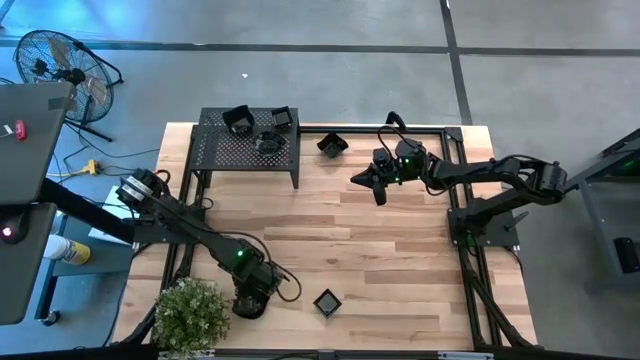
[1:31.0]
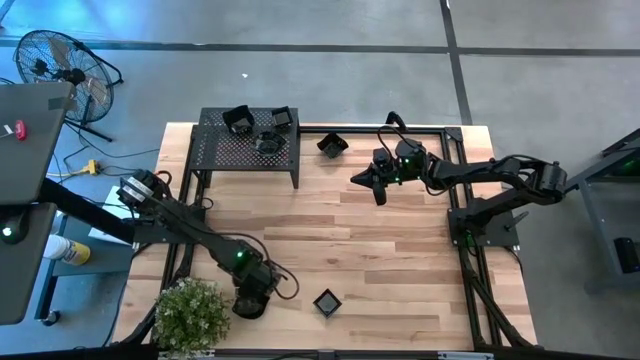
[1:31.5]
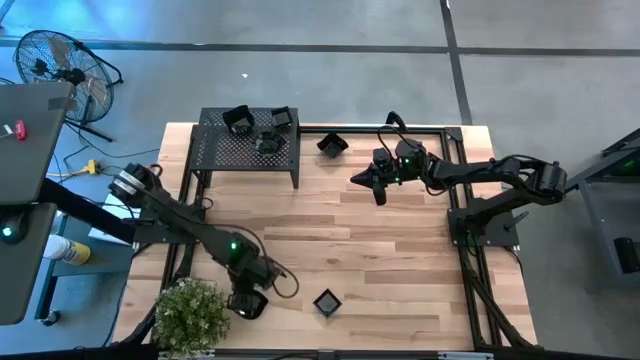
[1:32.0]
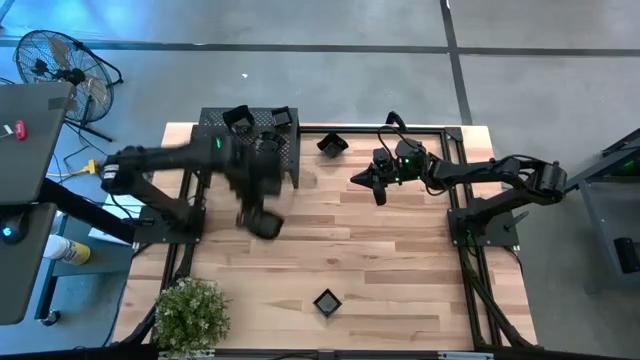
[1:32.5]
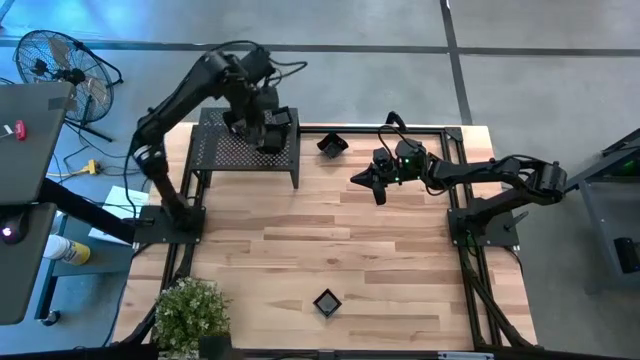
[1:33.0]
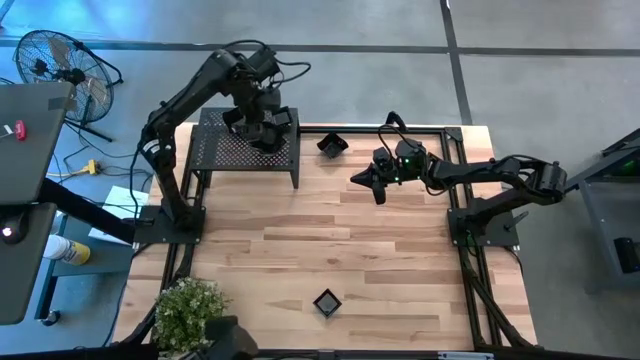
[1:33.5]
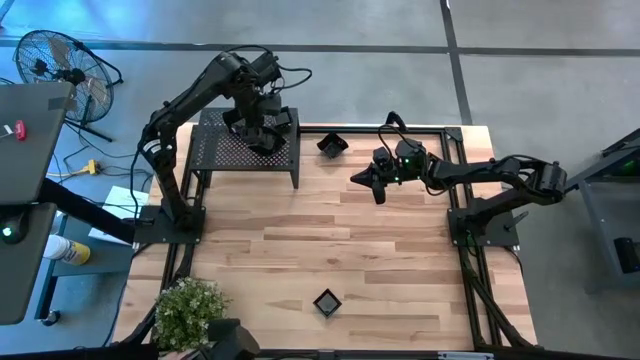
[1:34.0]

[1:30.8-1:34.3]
Task: Pick & Place Mini shaped plates
Stack the leaf-shaped plate on top of the other leaf-shaped plates on the shelf

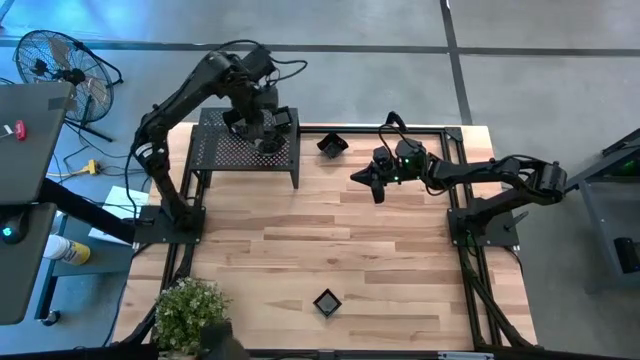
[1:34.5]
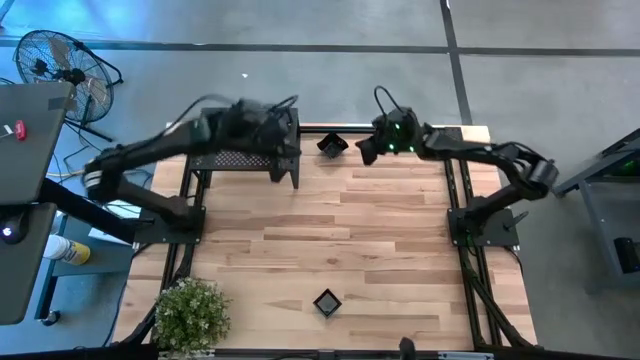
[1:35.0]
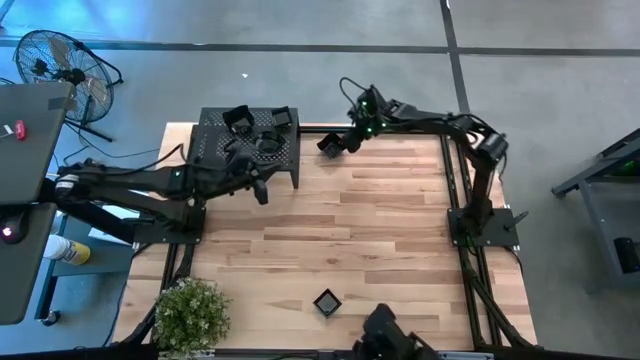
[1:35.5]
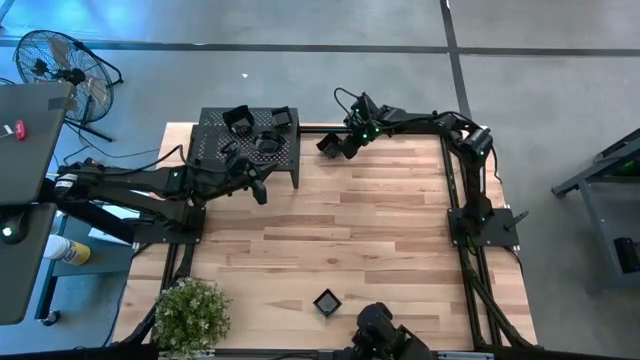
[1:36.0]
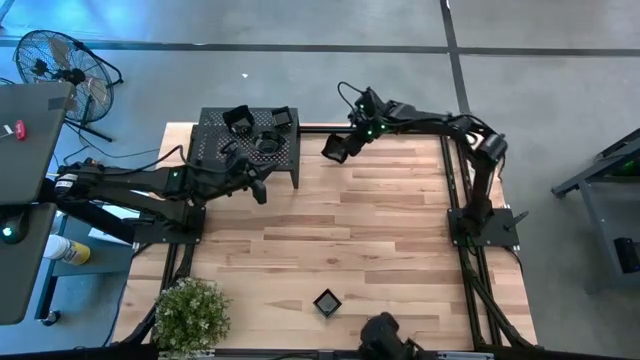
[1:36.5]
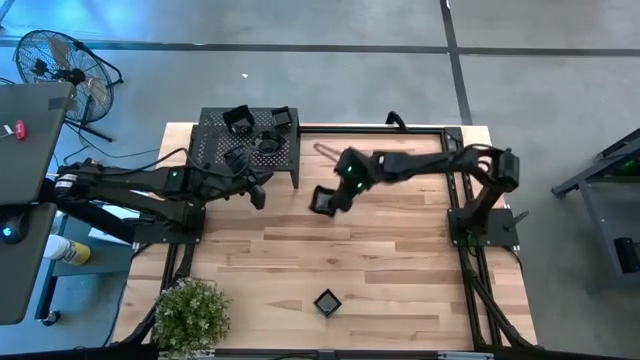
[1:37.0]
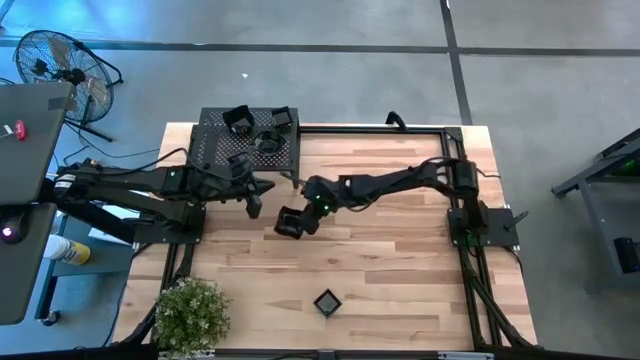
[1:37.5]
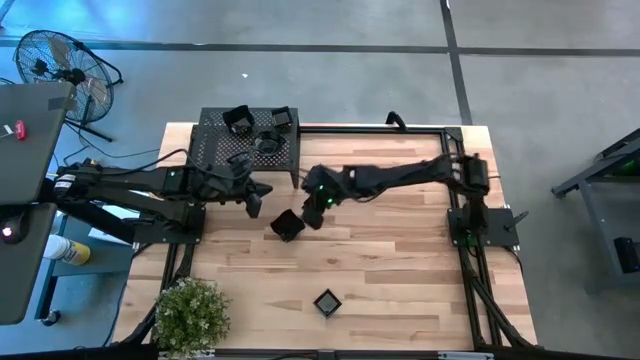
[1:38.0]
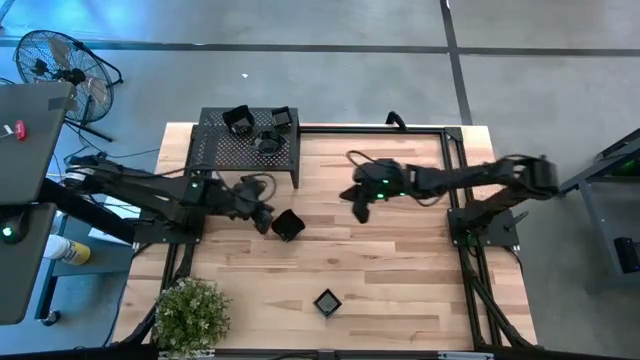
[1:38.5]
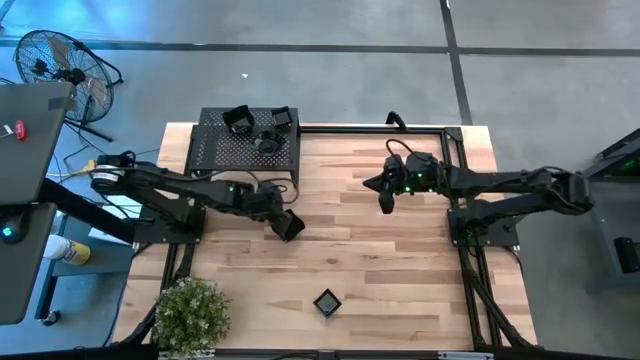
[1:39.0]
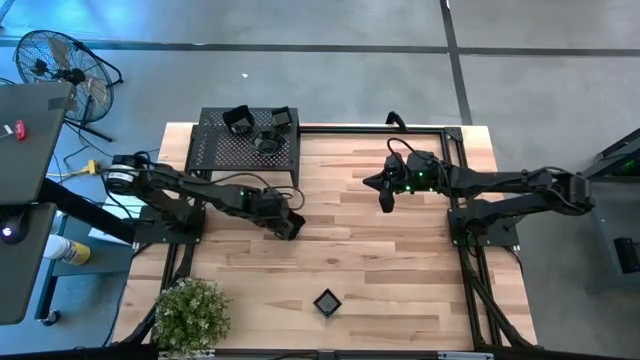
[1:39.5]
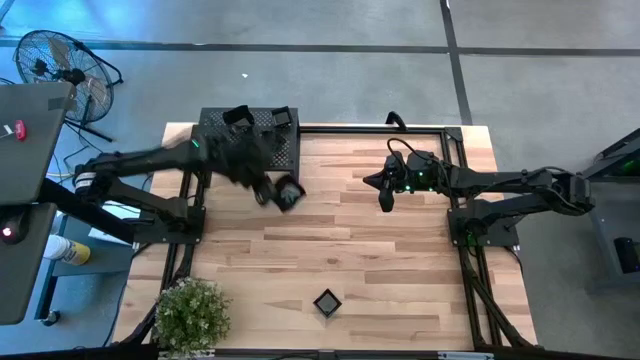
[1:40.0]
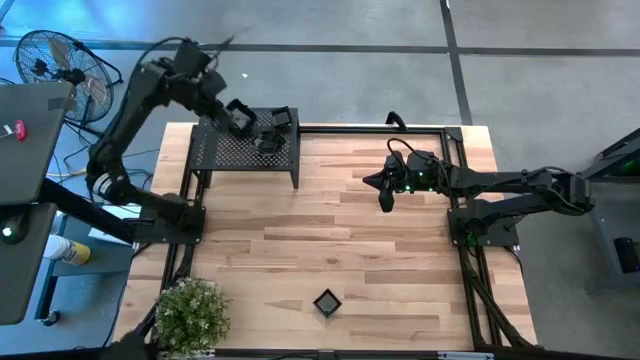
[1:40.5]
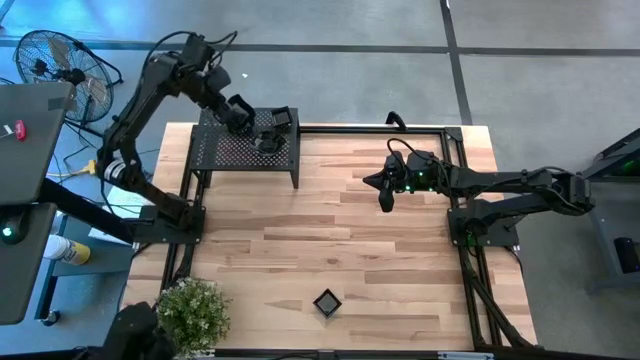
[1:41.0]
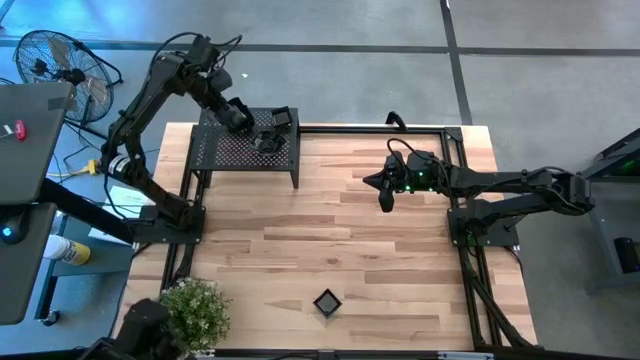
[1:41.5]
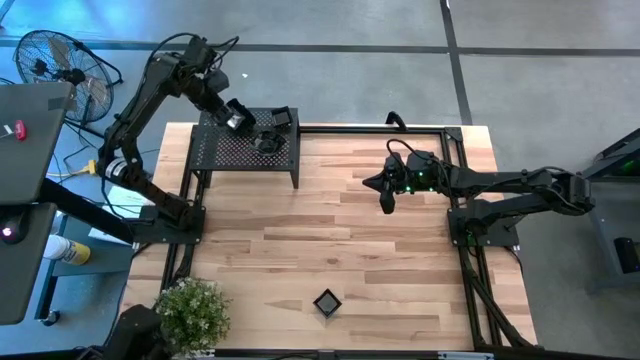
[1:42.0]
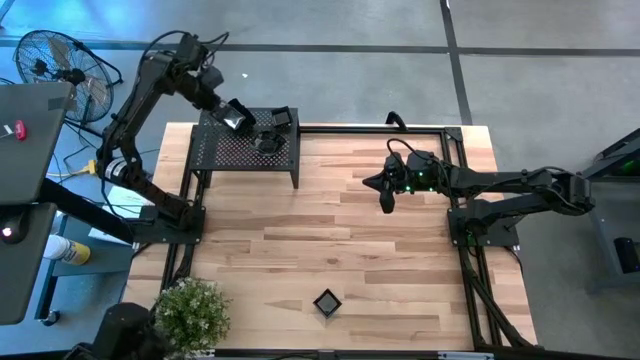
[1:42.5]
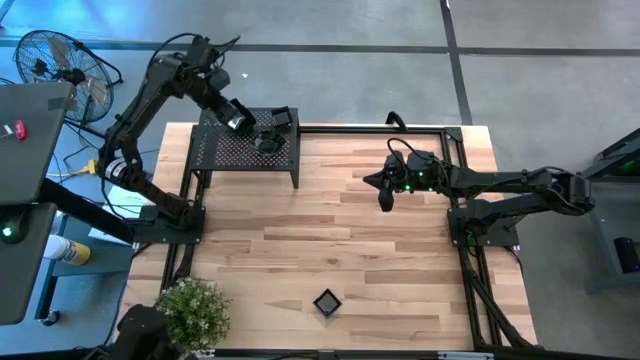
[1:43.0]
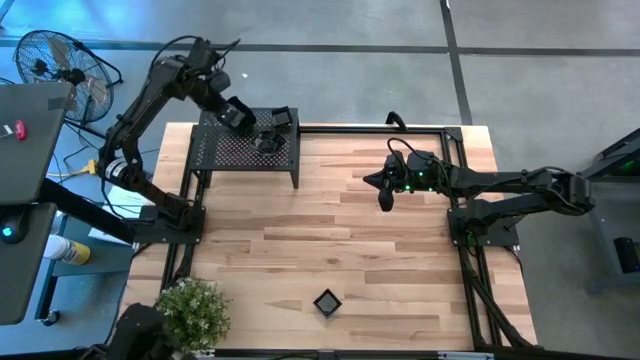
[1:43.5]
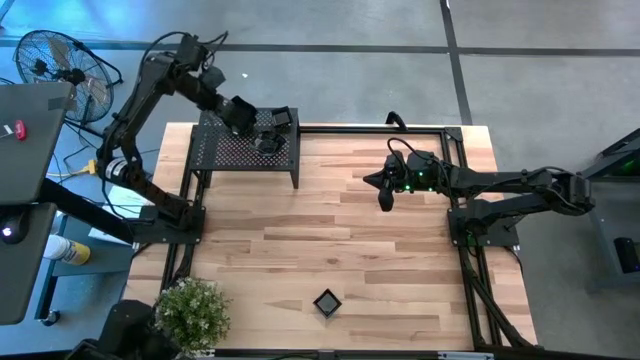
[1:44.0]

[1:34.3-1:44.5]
Stack the distorted square plate on top of the other distorted square plates on the shelf

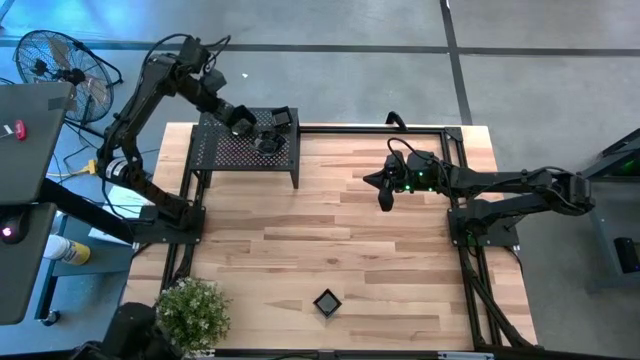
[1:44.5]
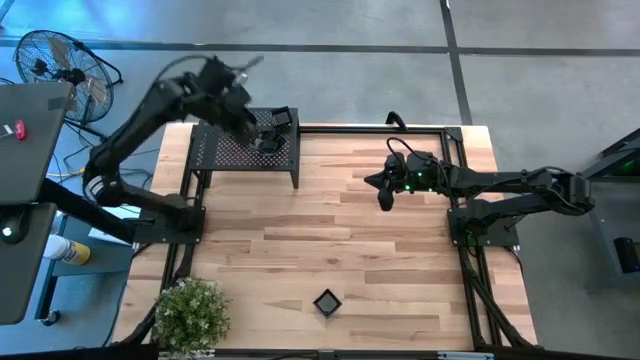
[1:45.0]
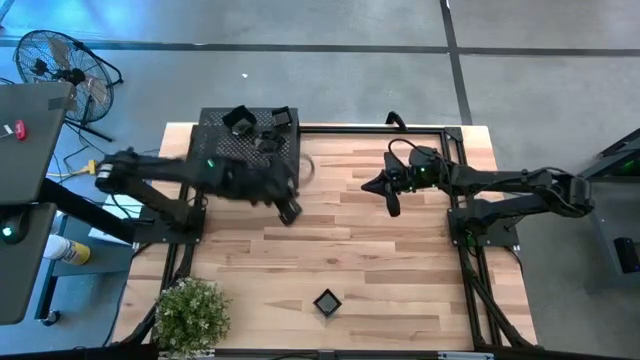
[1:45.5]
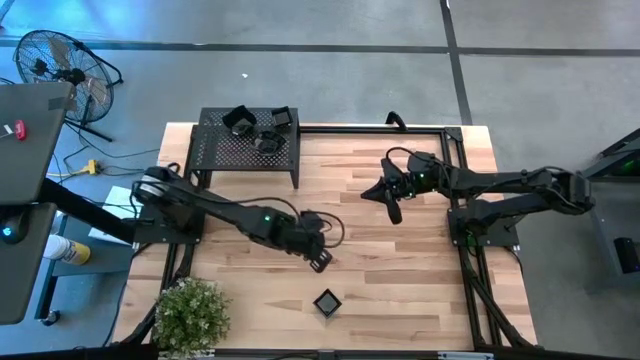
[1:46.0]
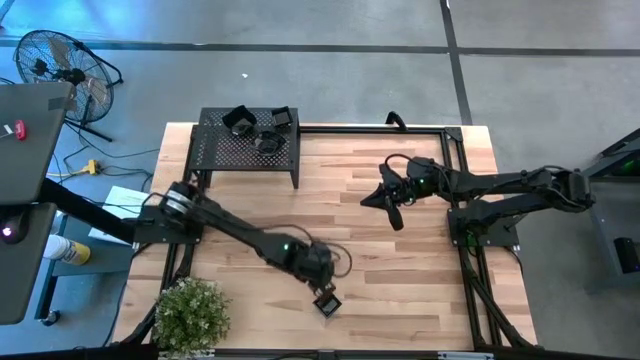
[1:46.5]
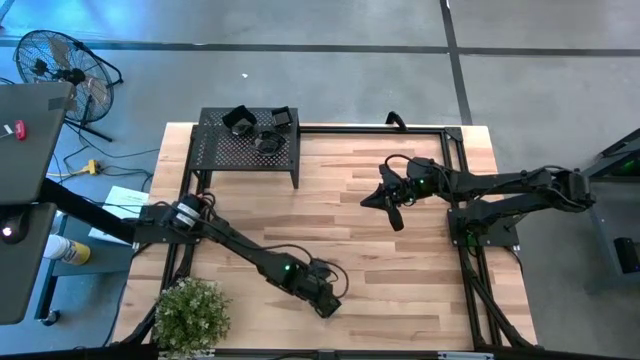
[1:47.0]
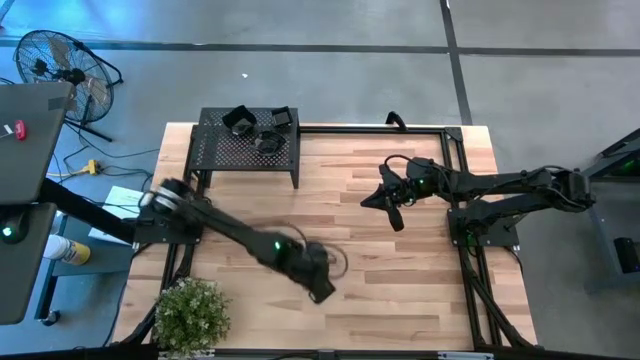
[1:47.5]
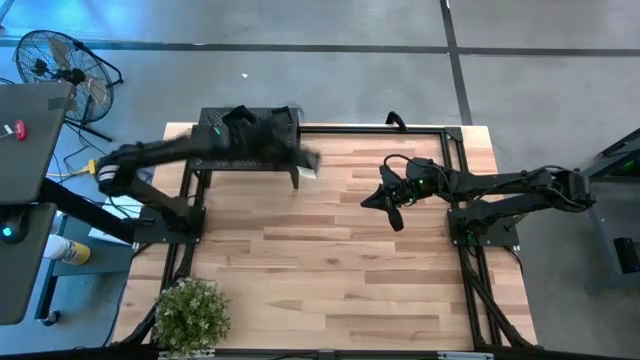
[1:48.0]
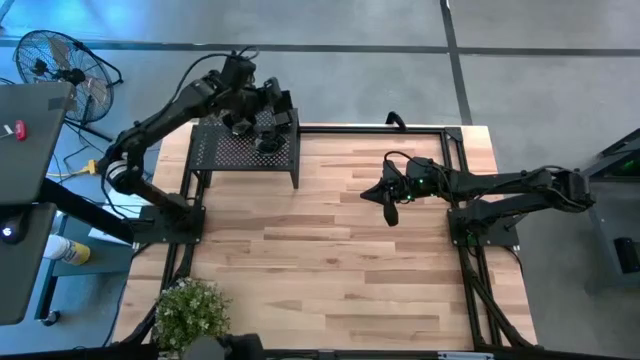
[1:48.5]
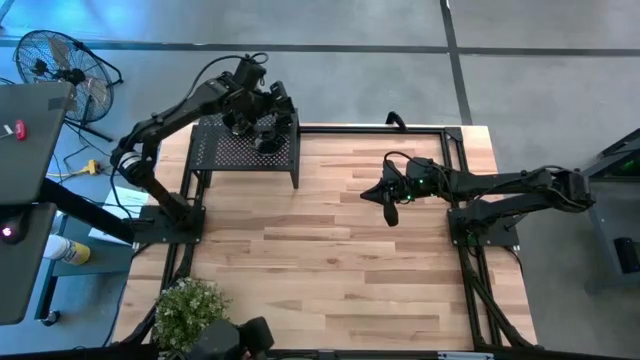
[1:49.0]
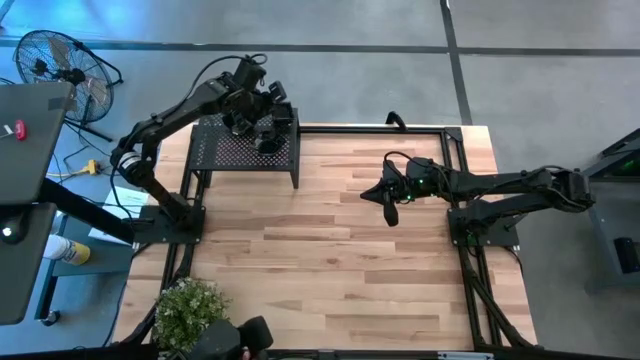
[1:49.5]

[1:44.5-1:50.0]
Stack the square plate on top of the other square plates on the shelf

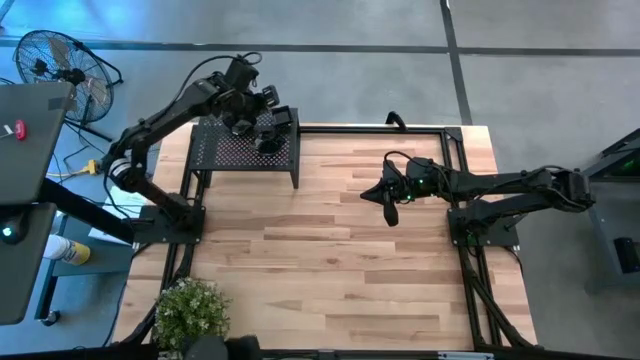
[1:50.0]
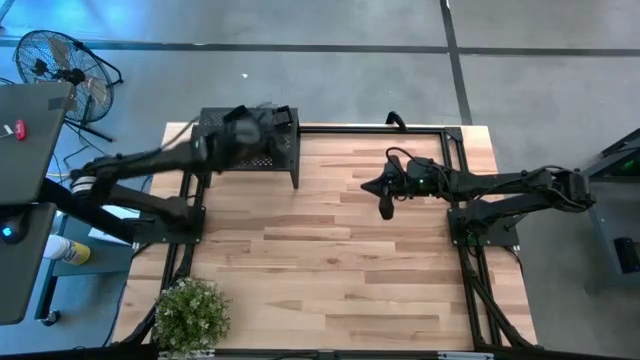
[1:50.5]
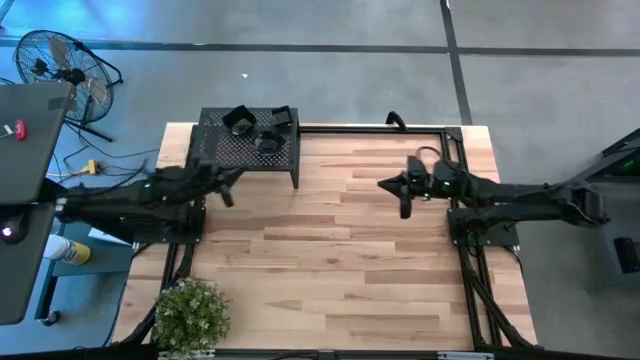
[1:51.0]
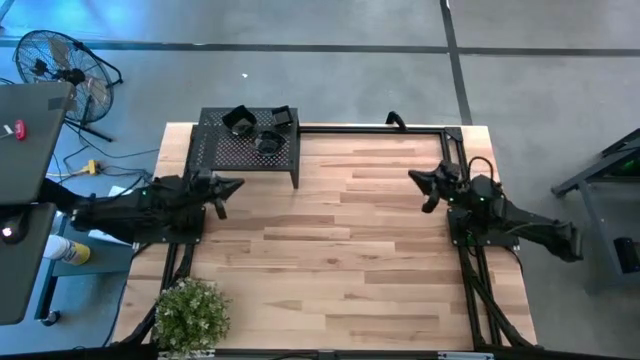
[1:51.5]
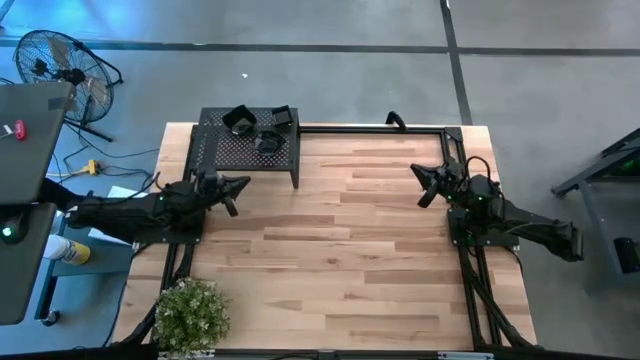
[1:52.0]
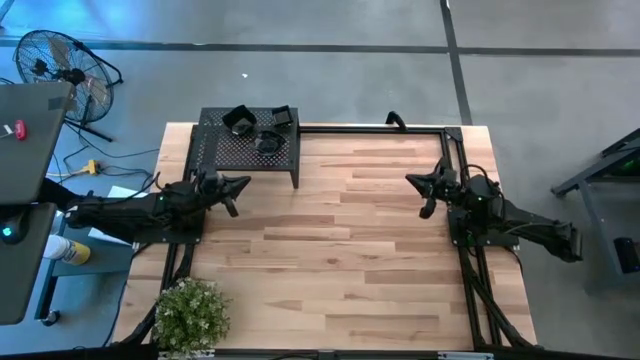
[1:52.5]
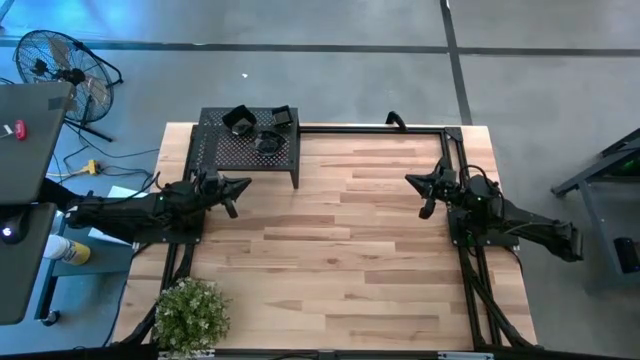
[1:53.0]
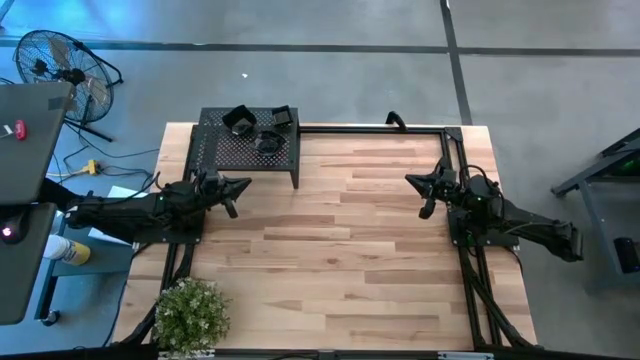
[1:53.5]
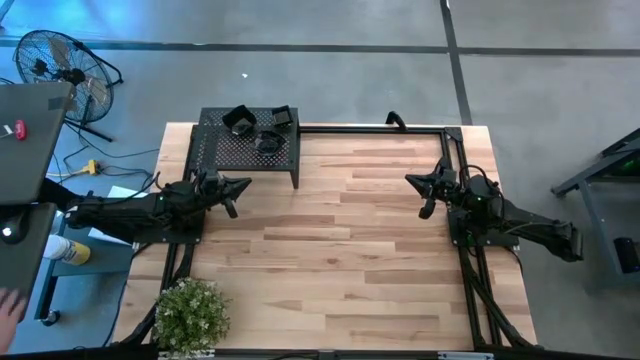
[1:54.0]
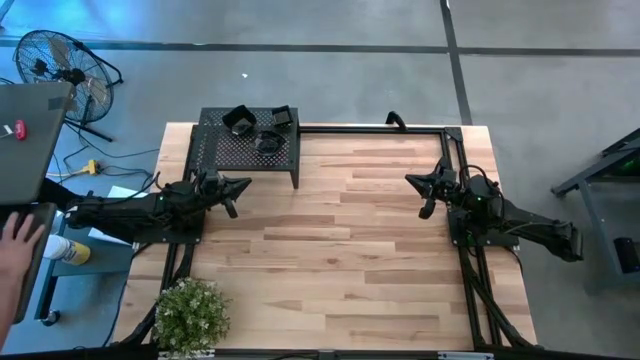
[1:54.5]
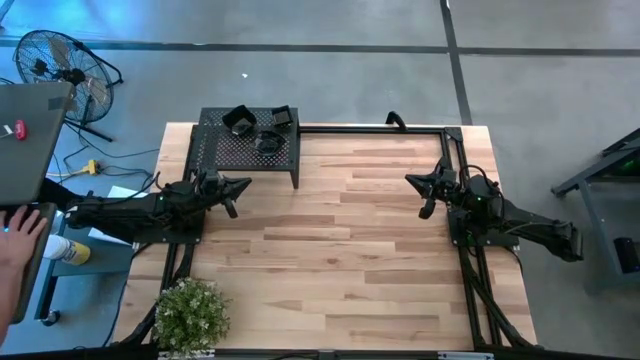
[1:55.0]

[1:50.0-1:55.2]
Return to Home Position
